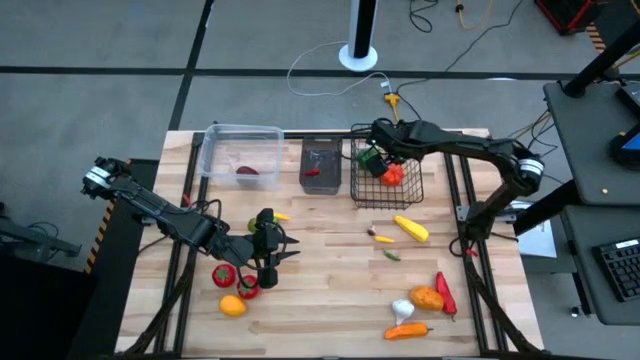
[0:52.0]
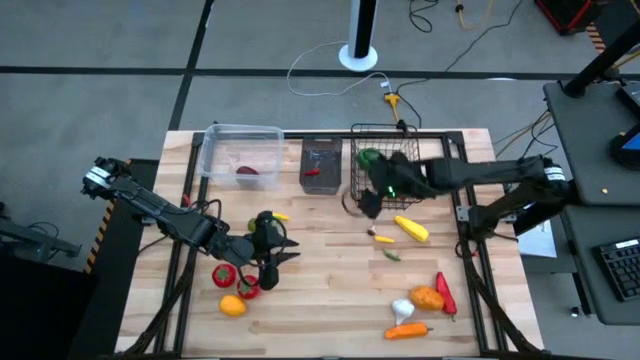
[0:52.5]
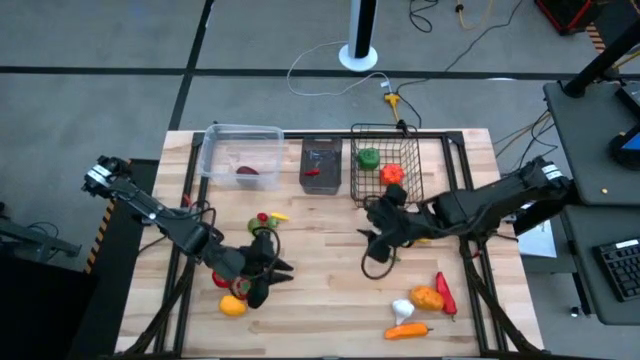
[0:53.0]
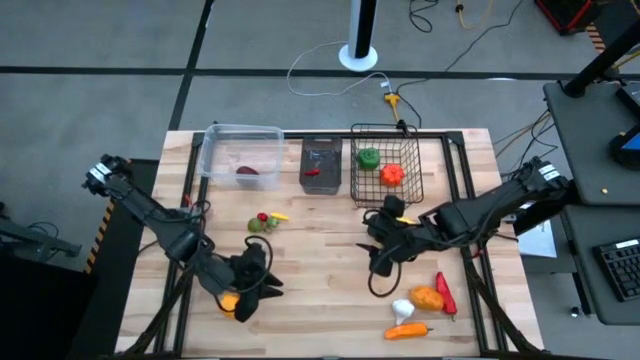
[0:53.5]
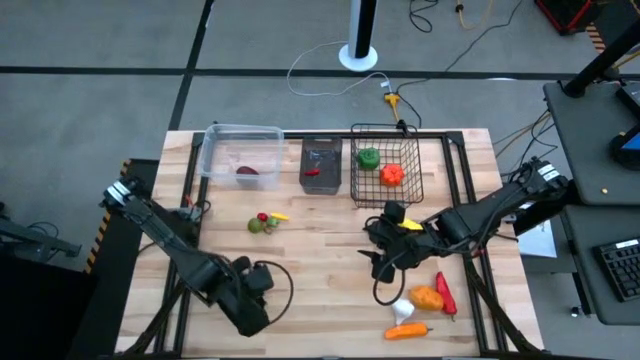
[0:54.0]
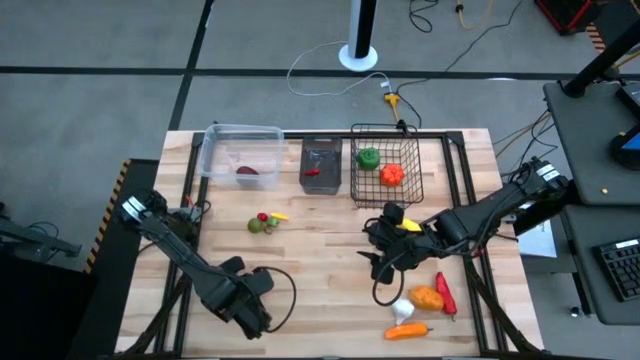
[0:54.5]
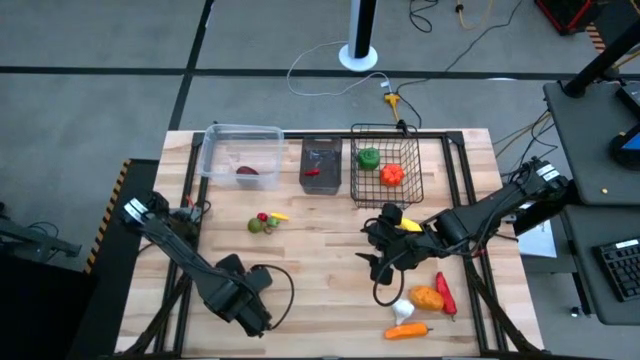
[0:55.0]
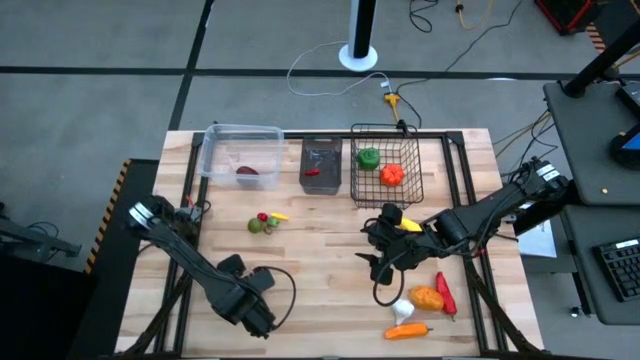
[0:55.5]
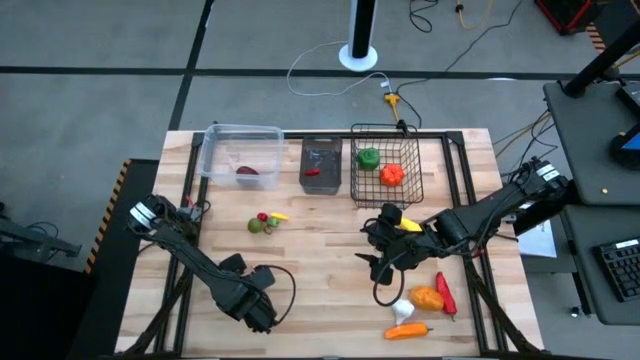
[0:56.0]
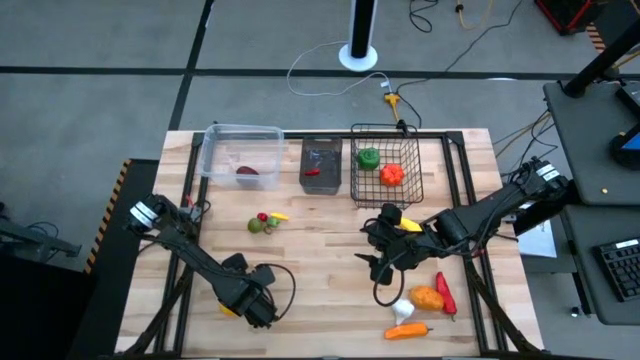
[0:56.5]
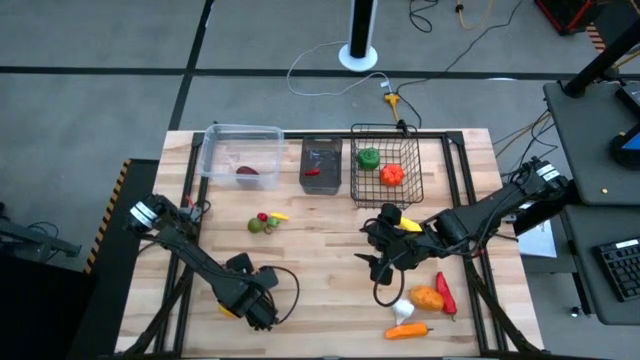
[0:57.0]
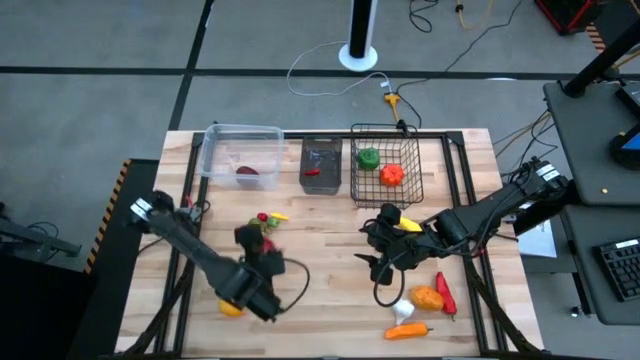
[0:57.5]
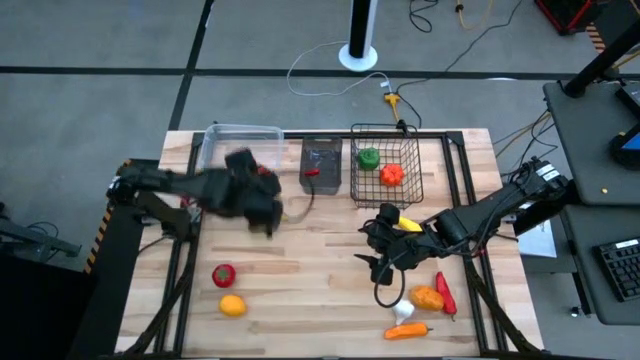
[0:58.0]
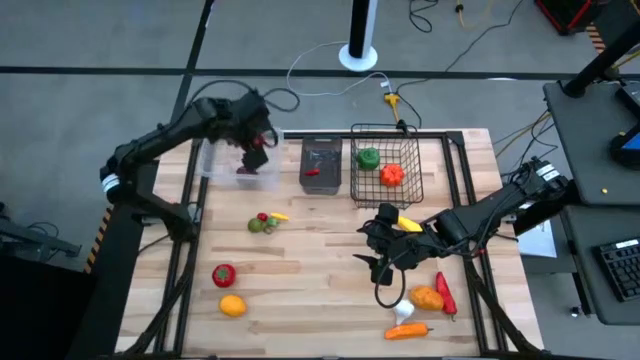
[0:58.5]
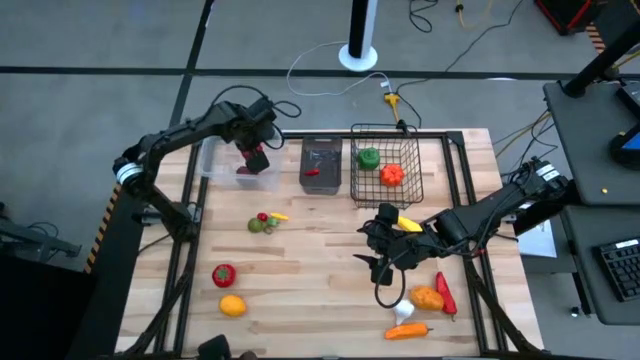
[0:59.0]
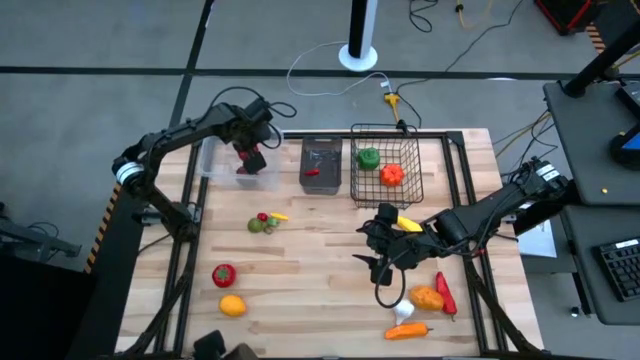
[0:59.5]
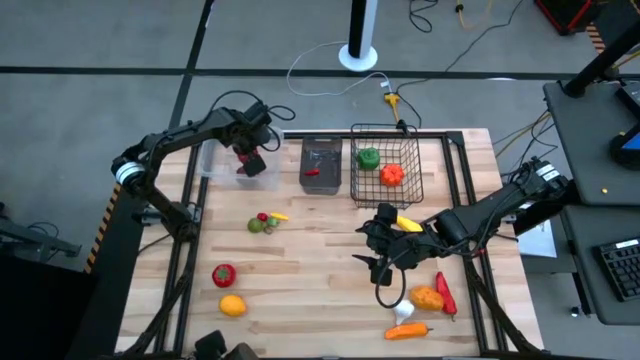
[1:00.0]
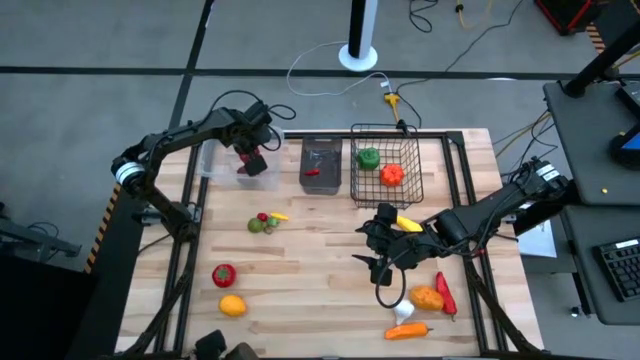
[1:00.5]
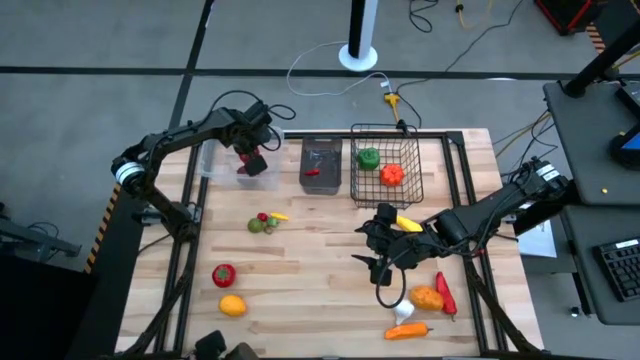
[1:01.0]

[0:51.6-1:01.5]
Task: Sort produce into baskets
Put the red tomato into the transparent bin

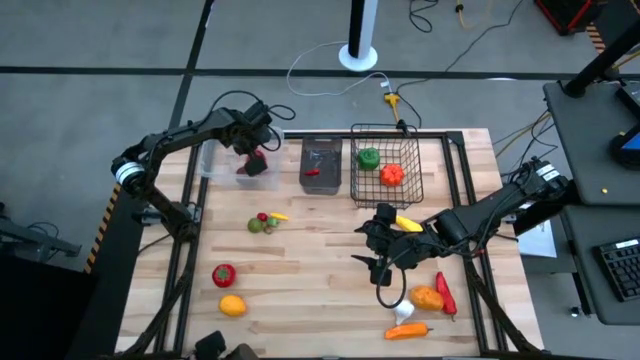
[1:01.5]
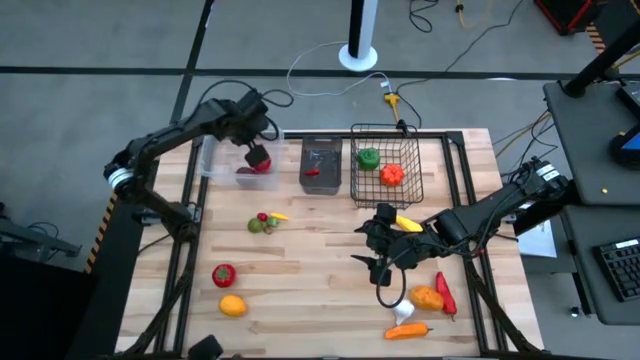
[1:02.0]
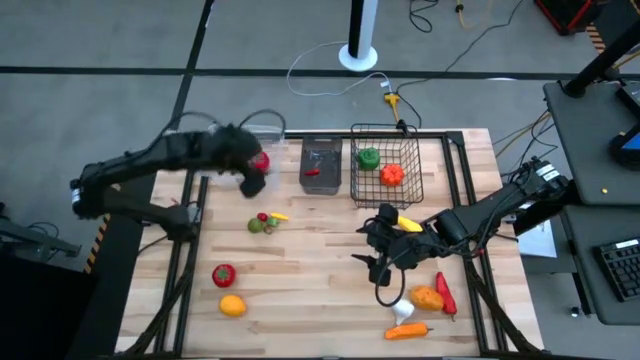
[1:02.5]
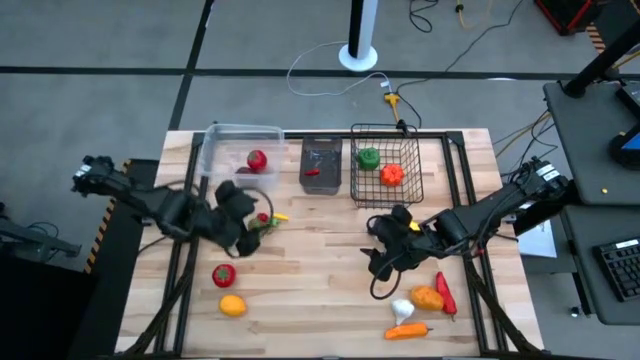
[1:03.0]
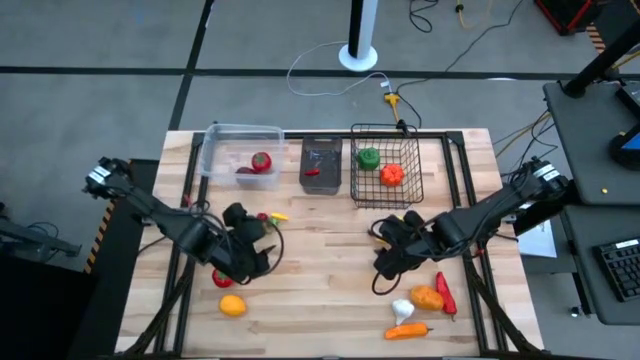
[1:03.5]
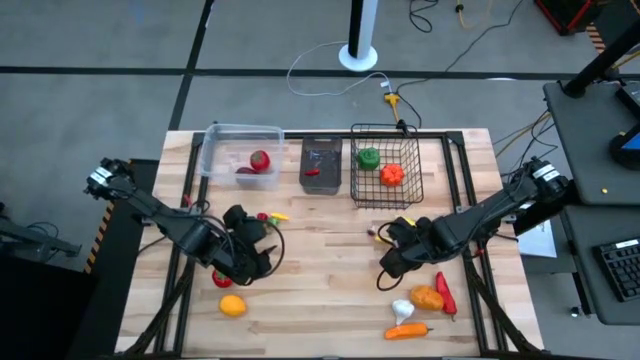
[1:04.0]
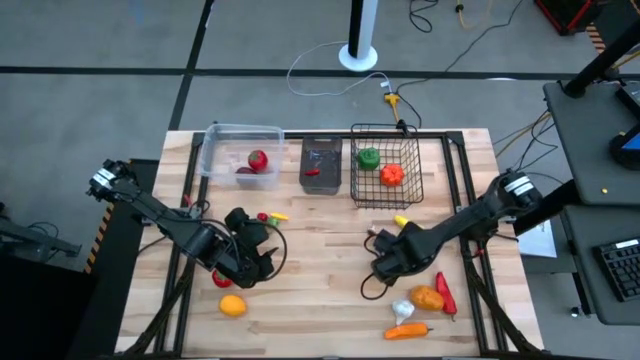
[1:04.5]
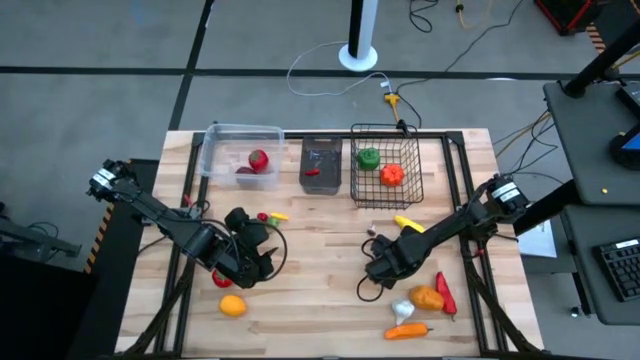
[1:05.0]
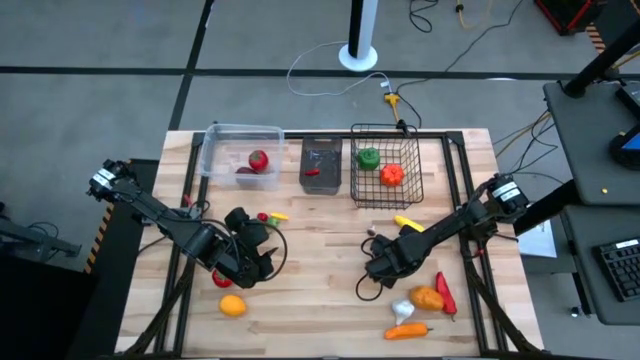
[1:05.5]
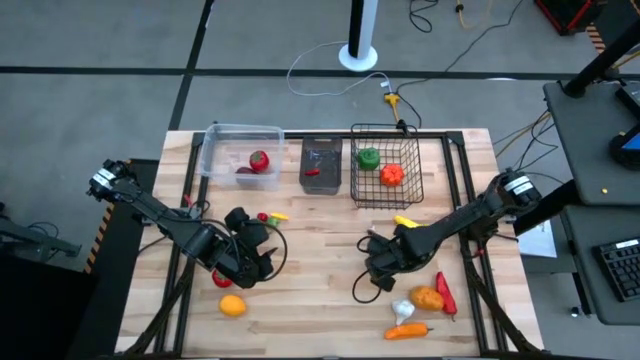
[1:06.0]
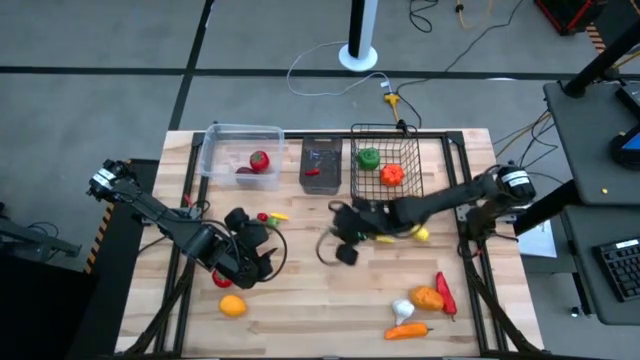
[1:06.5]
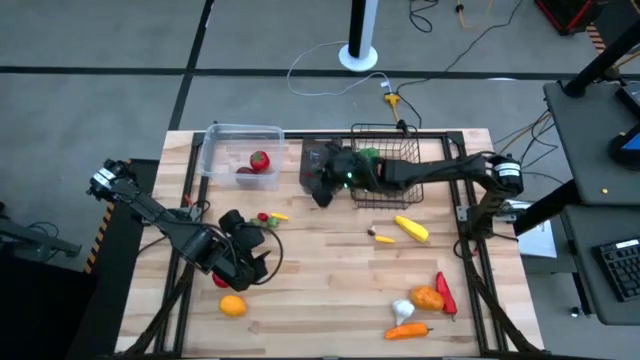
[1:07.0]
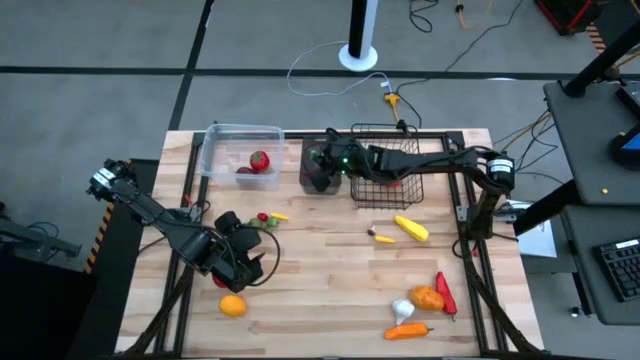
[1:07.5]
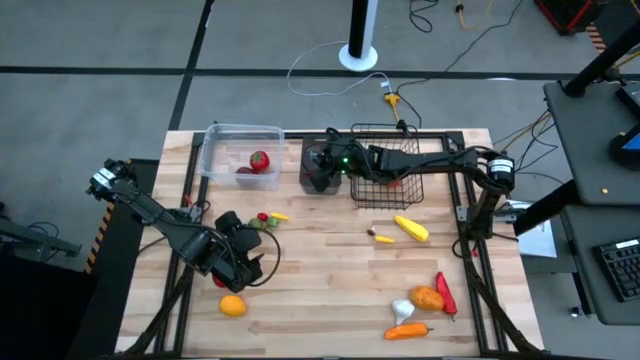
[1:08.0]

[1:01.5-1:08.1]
Put the green chili pepper into the black bin

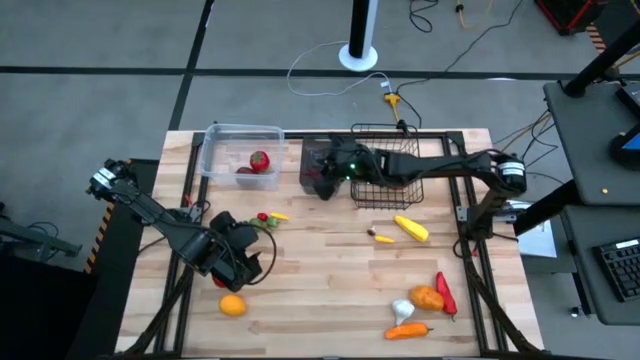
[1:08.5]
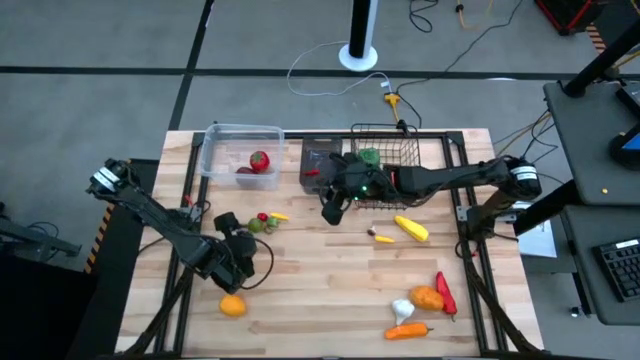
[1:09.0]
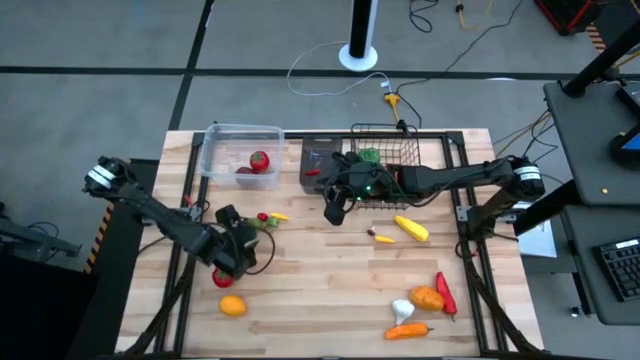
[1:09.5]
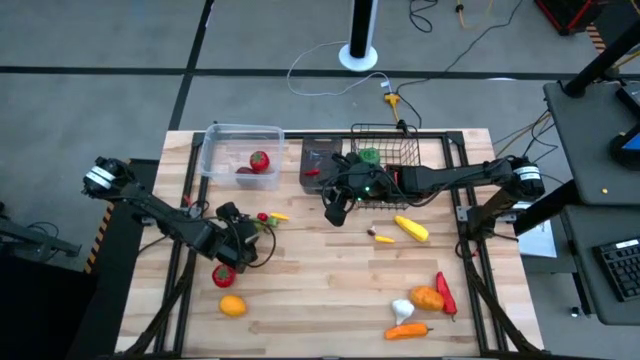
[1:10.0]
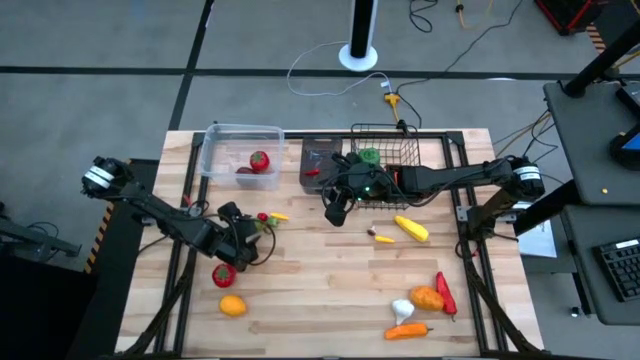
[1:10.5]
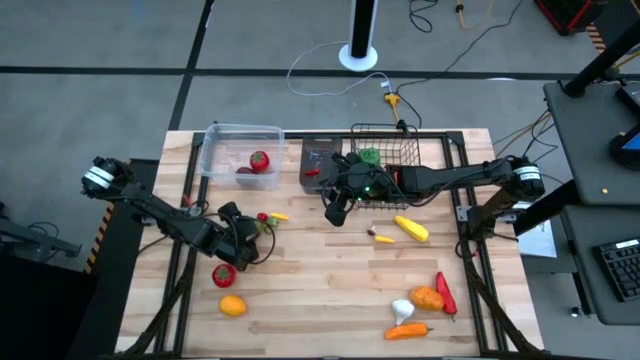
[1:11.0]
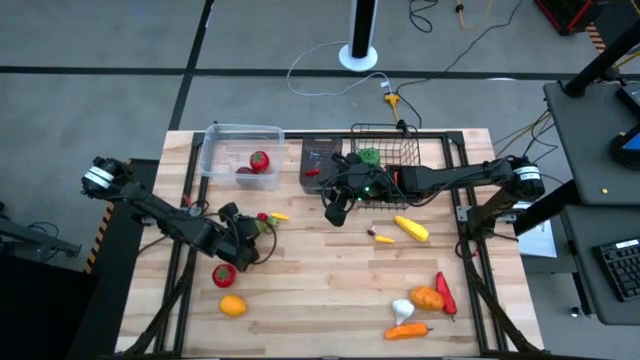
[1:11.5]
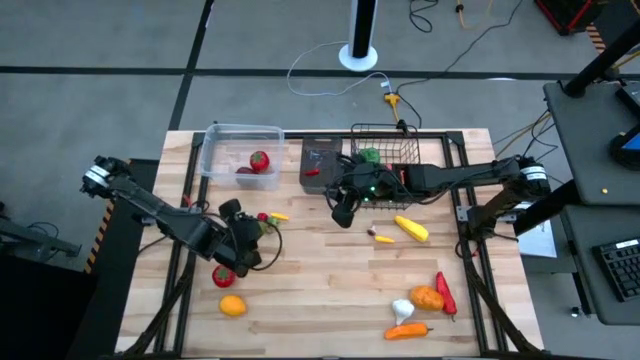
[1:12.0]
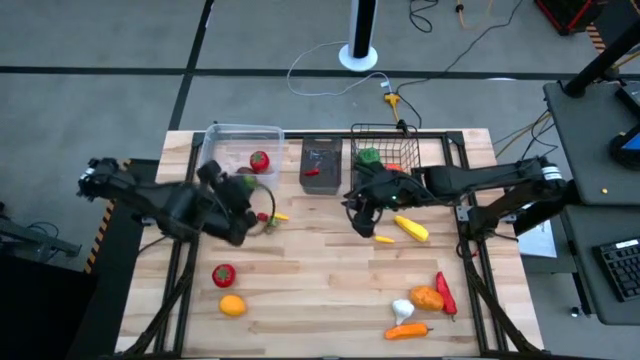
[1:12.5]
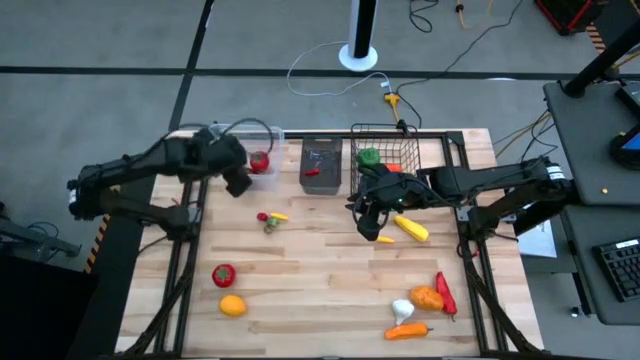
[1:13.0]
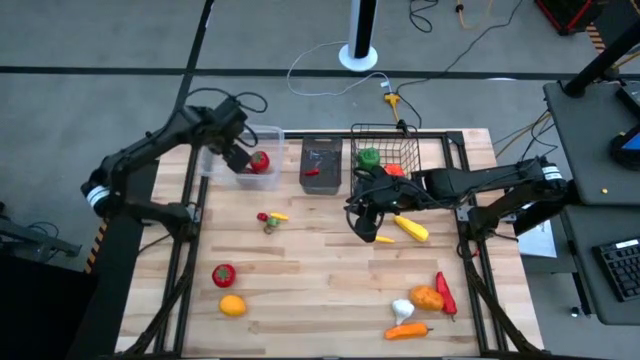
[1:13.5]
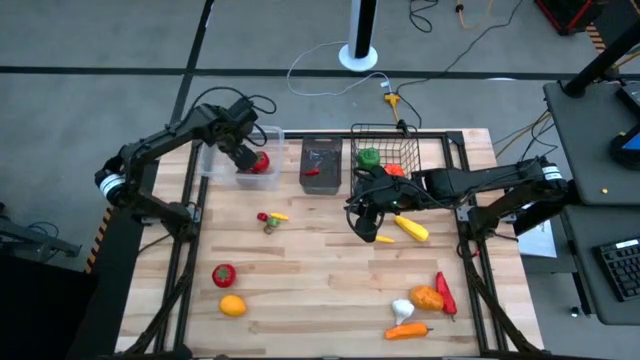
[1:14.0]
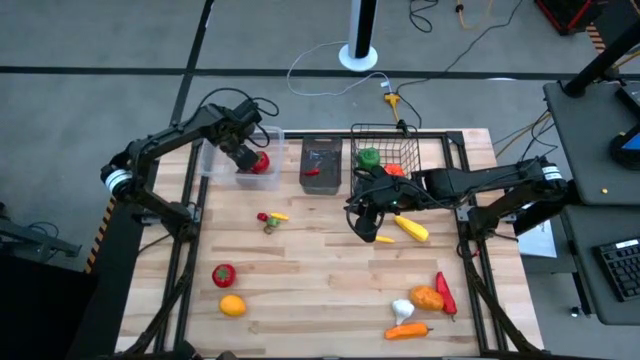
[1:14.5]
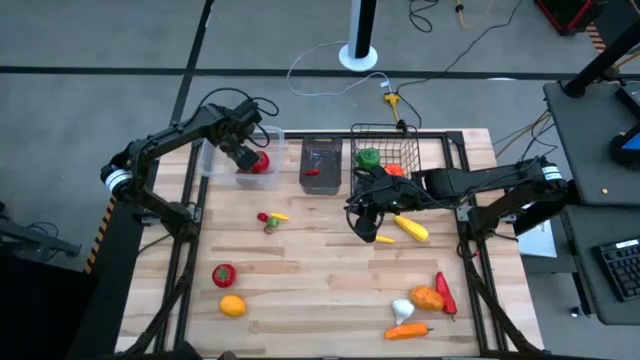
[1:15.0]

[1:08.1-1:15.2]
Put the green lime into the transparent bin
